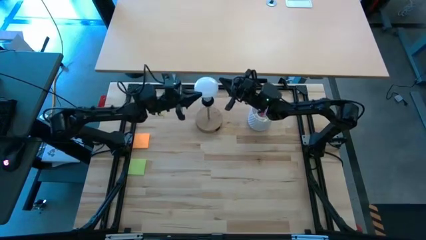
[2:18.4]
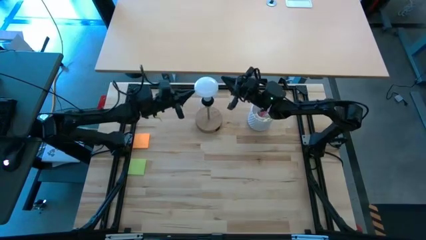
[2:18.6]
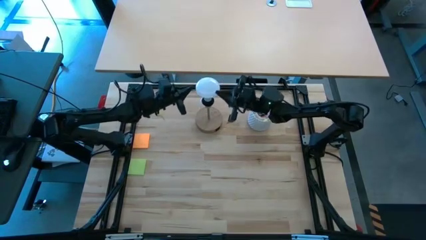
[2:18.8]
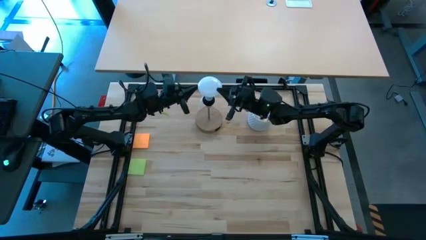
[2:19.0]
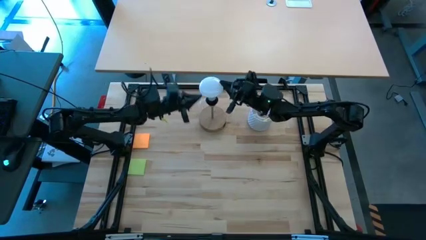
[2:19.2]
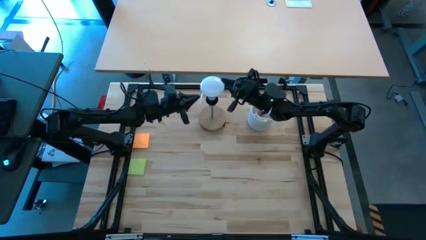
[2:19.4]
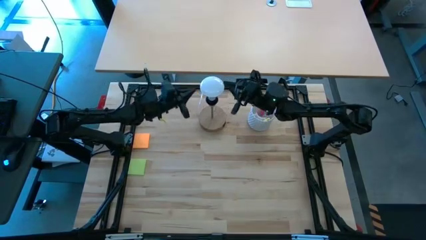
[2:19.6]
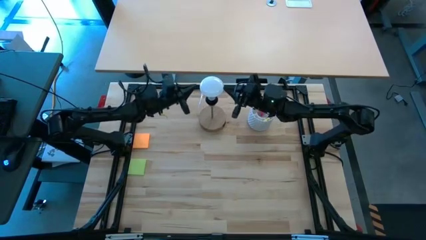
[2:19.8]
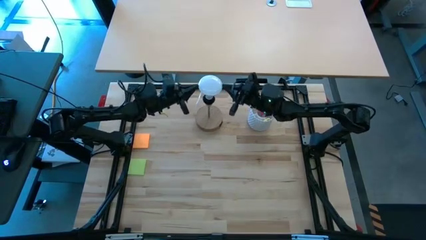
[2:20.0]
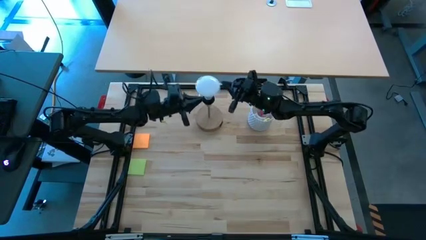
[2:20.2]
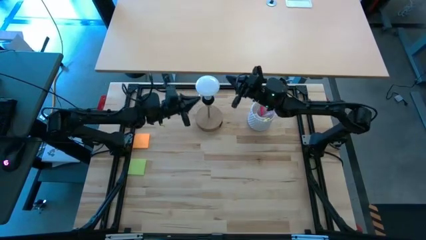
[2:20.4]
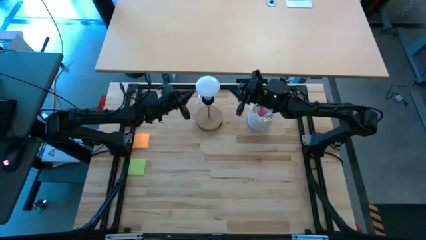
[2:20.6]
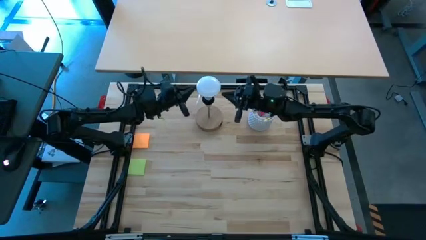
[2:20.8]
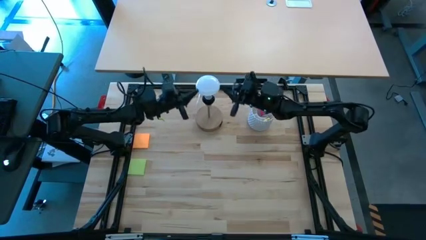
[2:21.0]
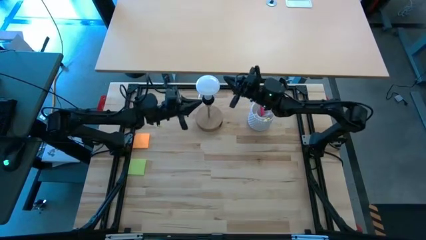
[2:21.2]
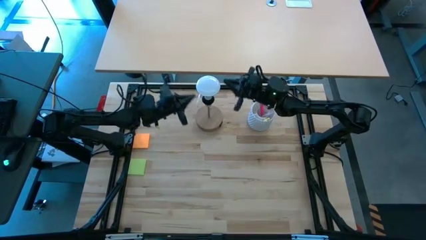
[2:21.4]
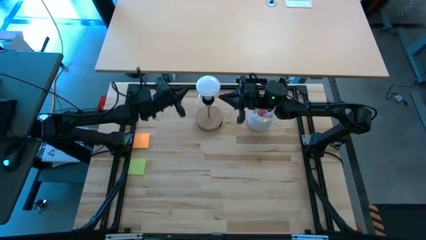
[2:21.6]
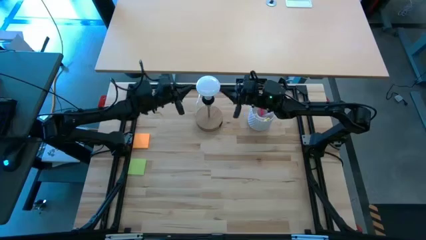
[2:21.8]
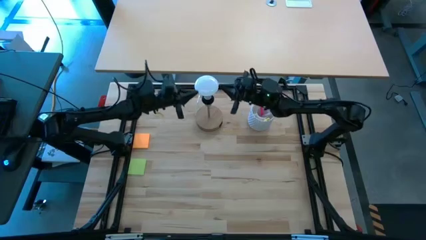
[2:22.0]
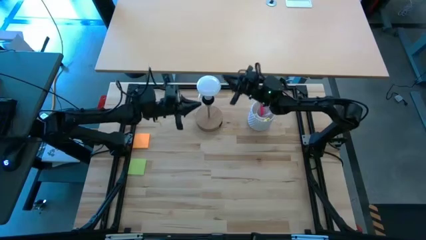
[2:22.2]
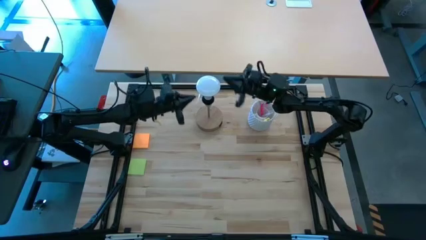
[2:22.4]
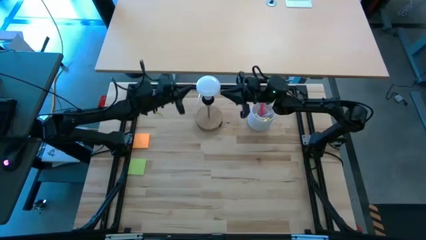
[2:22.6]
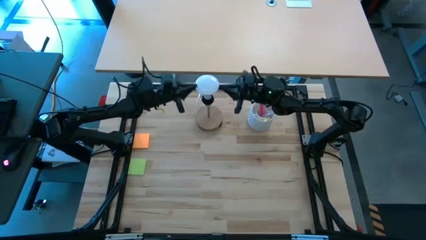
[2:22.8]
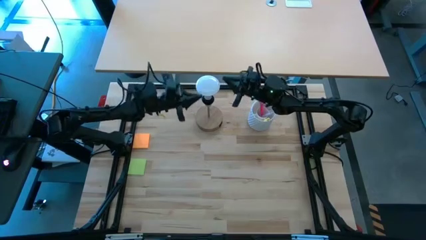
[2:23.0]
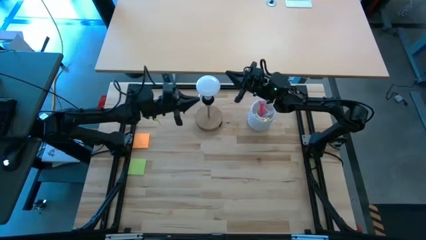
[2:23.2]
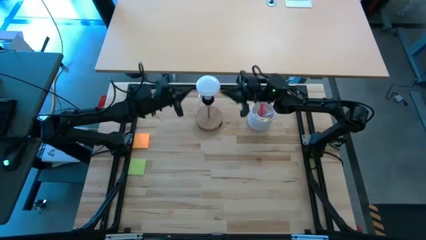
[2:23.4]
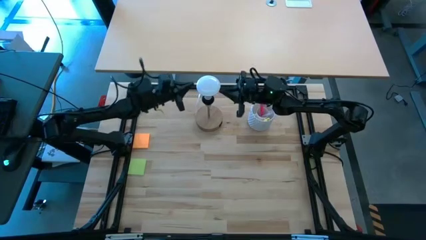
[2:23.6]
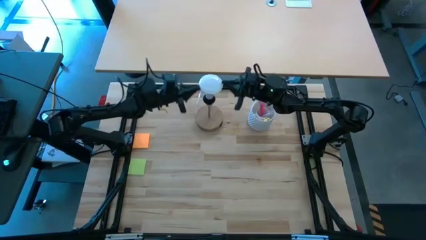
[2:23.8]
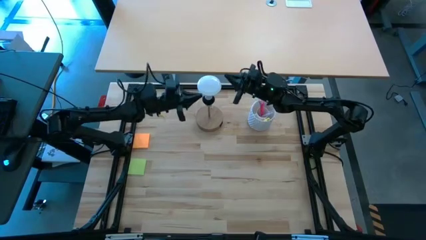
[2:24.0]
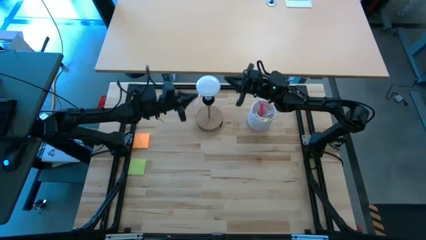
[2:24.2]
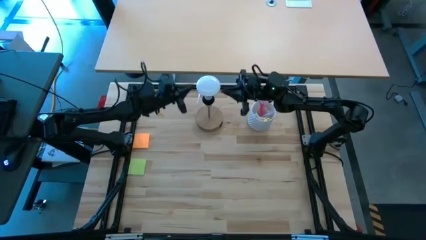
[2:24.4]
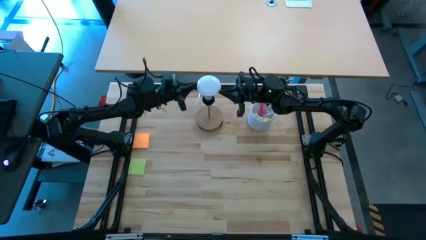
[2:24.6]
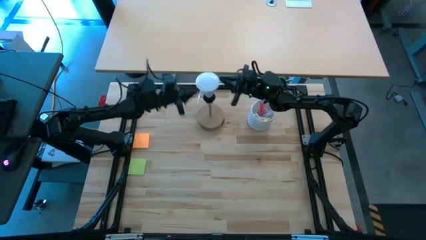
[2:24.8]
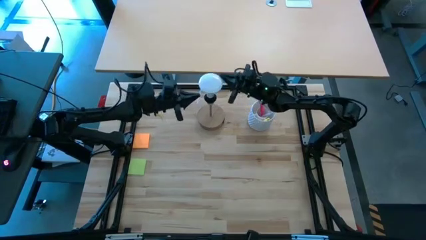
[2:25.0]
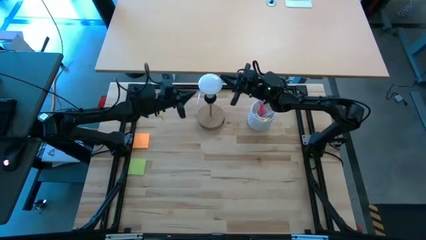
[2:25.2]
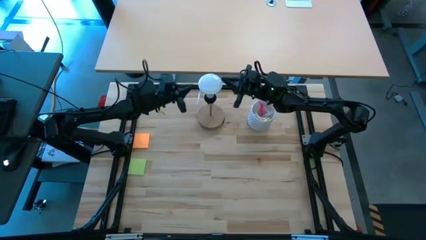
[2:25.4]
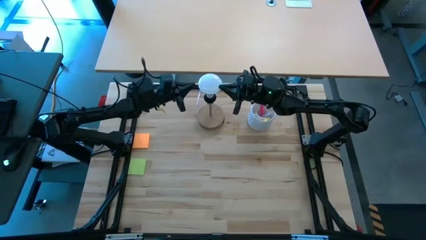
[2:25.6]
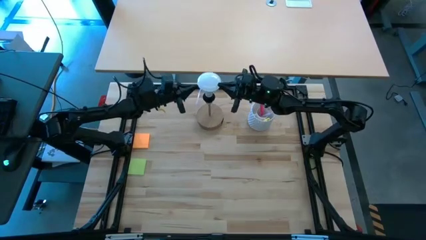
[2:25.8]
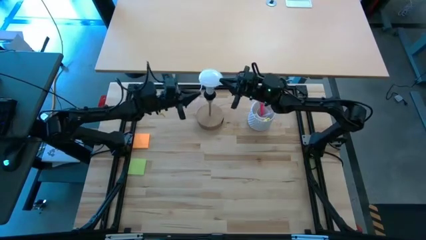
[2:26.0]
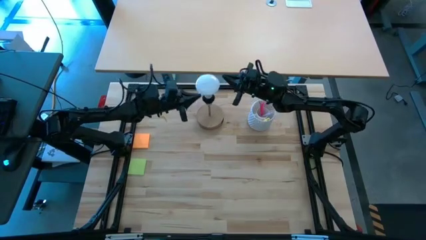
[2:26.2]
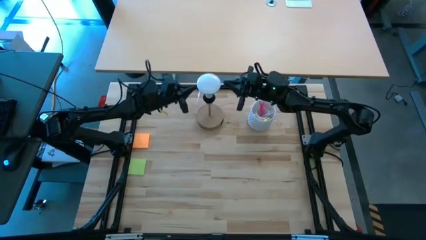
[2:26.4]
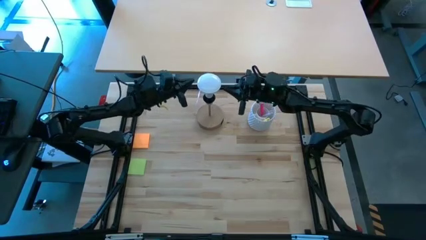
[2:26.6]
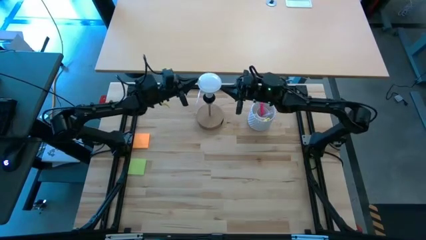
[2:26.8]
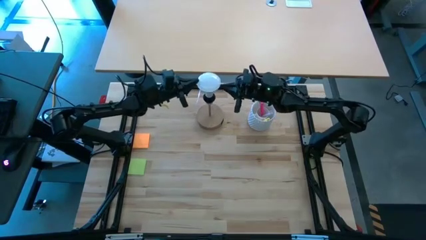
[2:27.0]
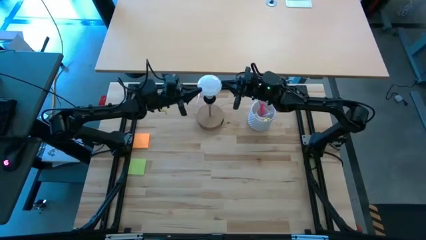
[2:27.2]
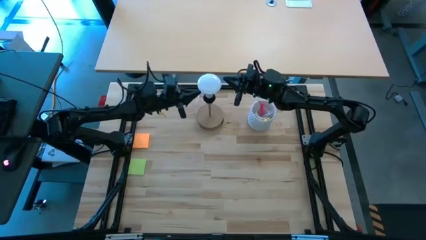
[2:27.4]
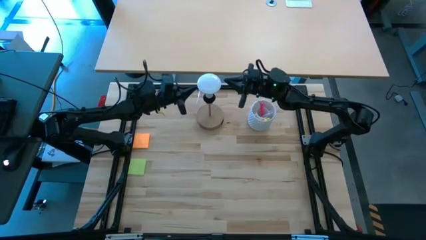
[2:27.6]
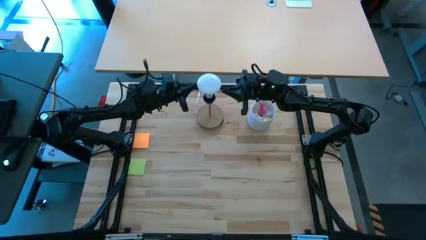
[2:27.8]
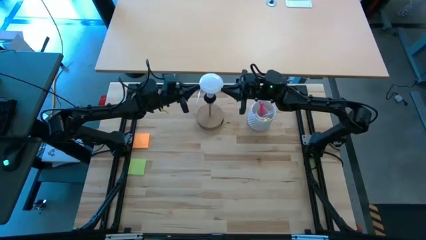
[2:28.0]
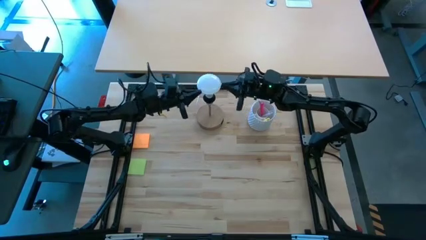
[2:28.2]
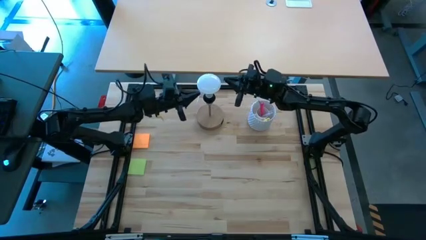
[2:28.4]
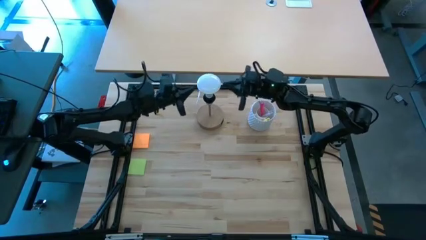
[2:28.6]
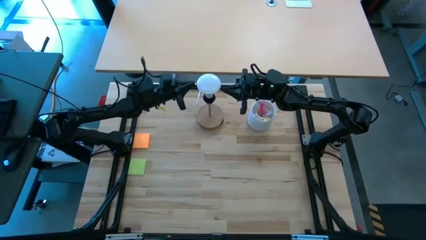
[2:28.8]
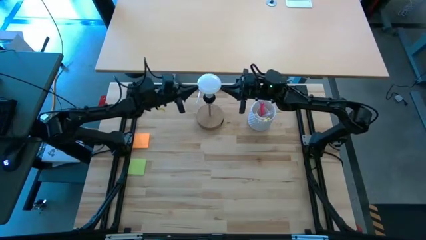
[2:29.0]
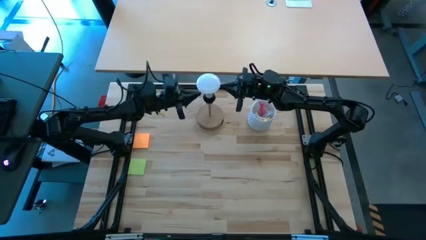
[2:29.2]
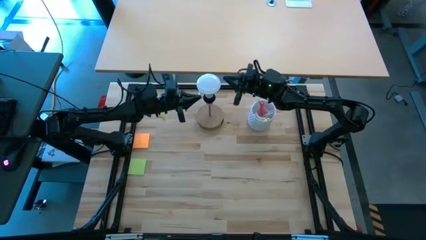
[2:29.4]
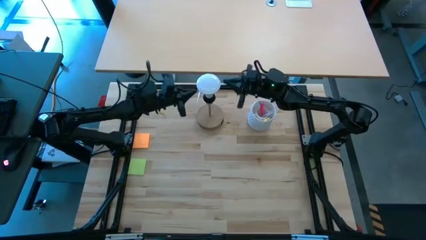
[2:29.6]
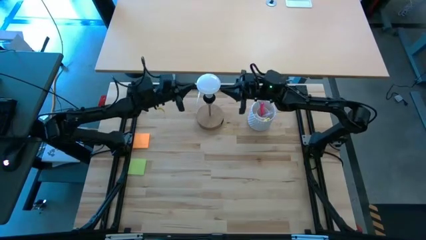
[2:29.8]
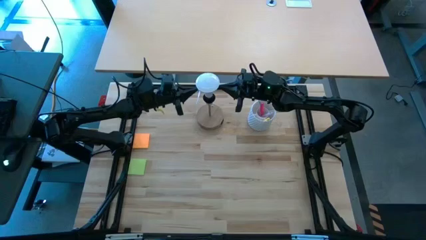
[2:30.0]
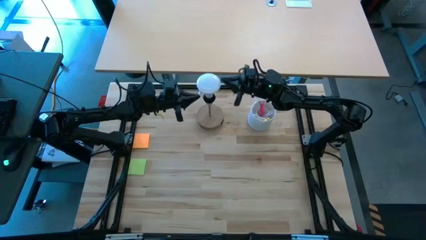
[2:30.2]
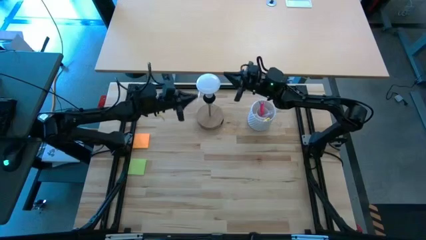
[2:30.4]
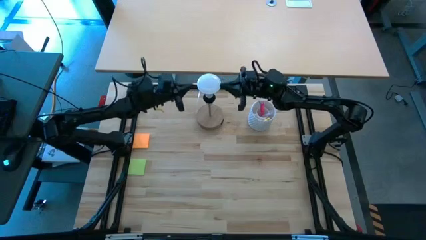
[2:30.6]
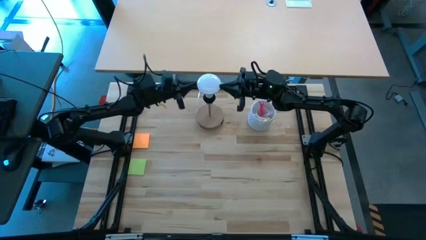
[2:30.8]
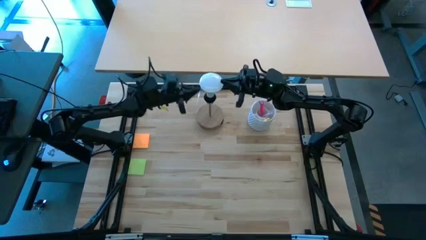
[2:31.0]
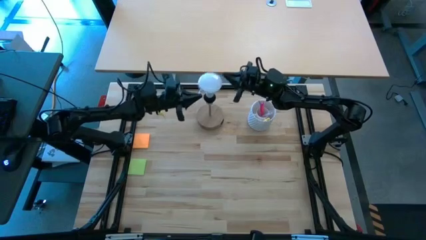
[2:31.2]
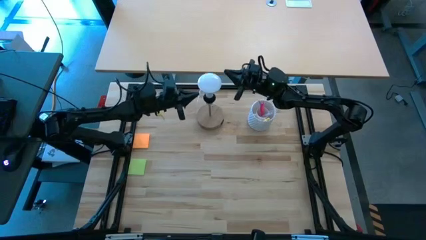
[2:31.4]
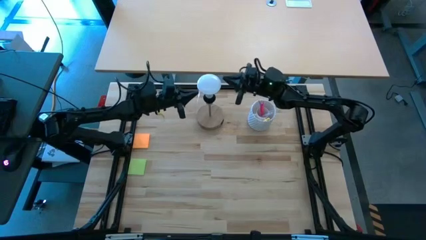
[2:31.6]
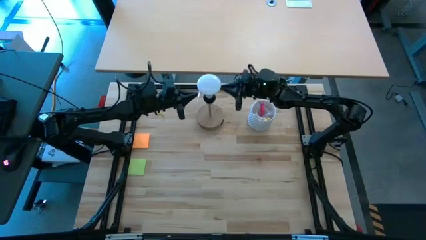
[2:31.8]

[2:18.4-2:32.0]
Task: Screw lightbulb
Remove the lightbulb from the brown lamp

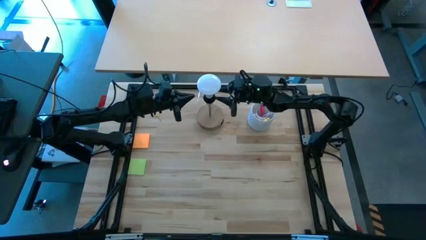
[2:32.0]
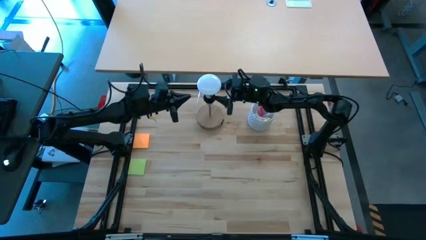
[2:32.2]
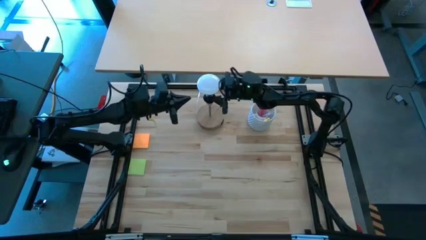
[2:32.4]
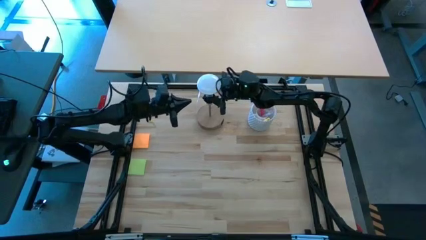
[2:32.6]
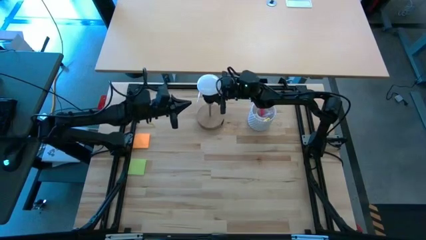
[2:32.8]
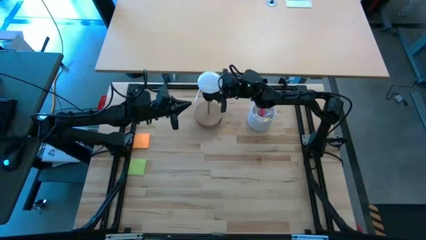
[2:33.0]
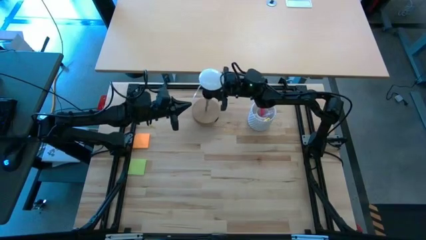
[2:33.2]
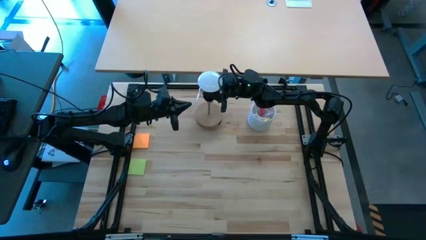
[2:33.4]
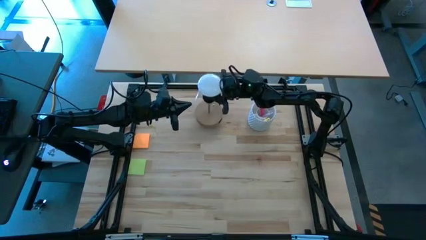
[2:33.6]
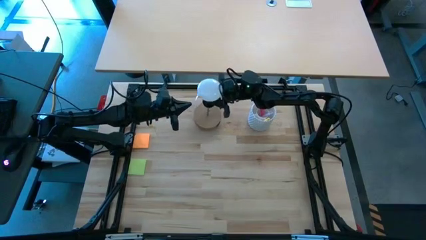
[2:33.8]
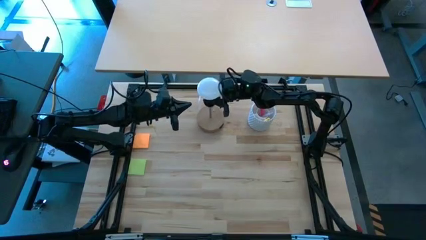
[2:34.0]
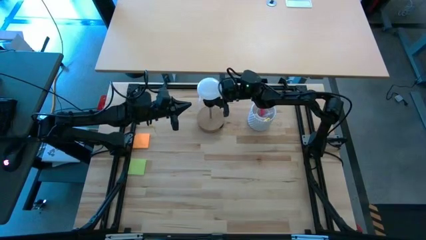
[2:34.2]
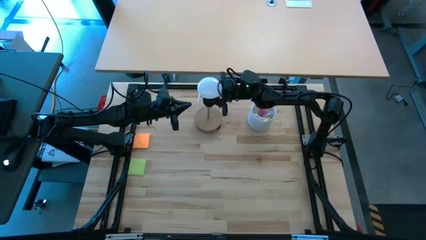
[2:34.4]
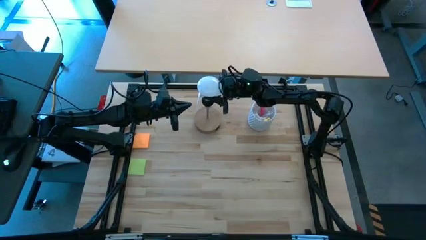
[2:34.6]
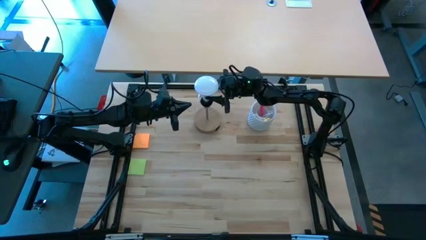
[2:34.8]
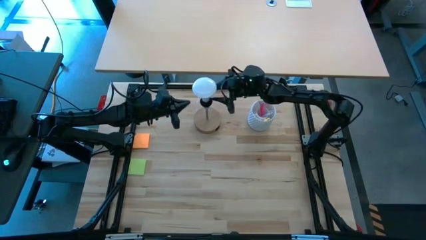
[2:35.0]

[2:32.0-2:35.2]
Move the lamp to the top of the table
